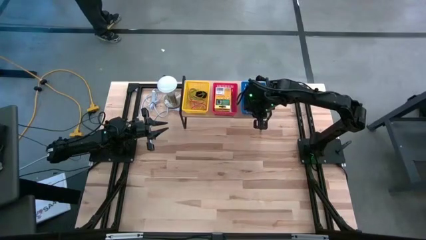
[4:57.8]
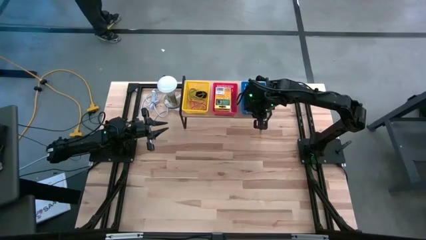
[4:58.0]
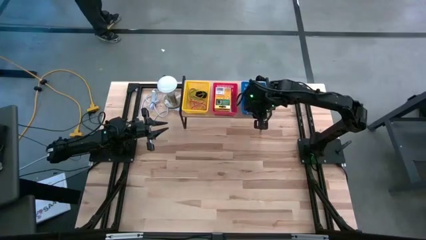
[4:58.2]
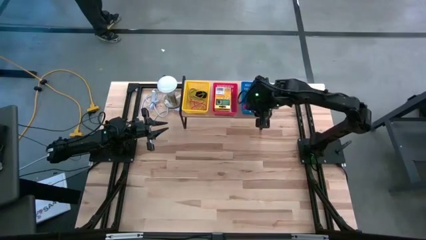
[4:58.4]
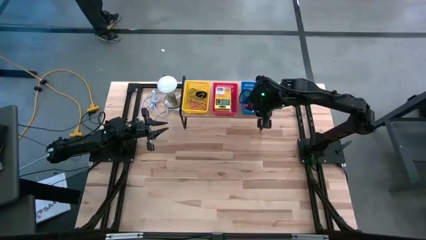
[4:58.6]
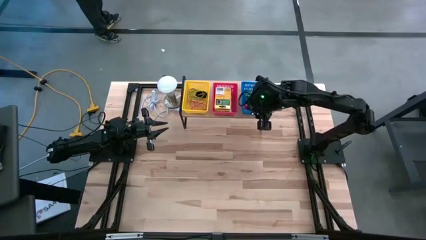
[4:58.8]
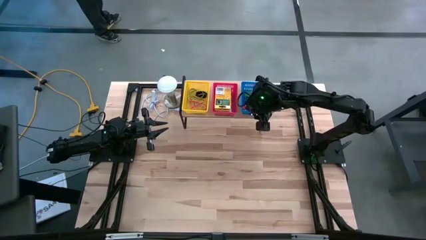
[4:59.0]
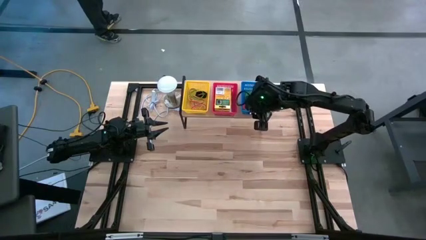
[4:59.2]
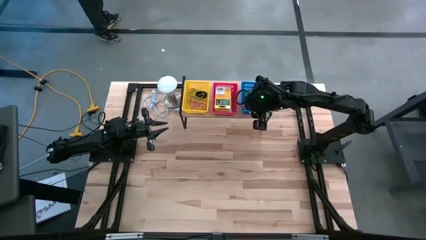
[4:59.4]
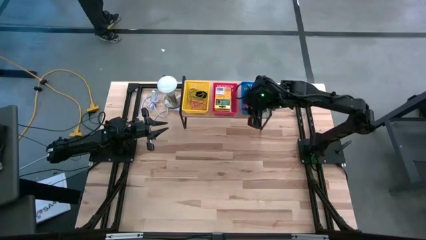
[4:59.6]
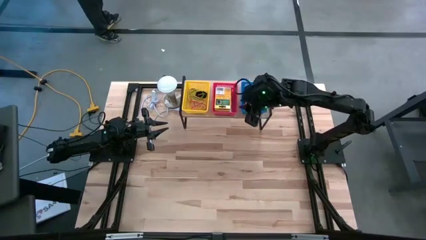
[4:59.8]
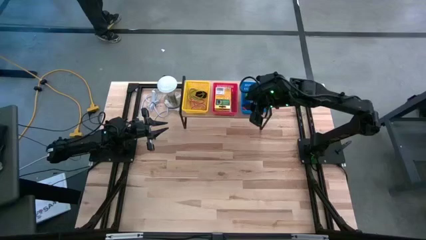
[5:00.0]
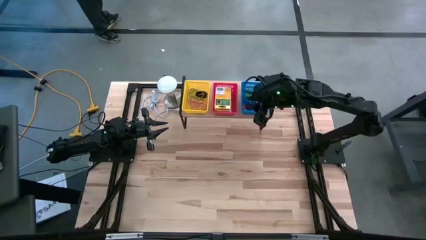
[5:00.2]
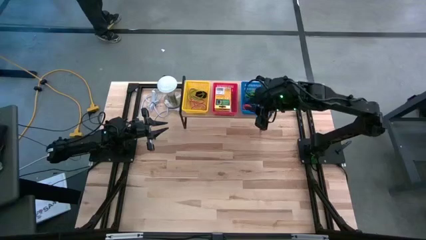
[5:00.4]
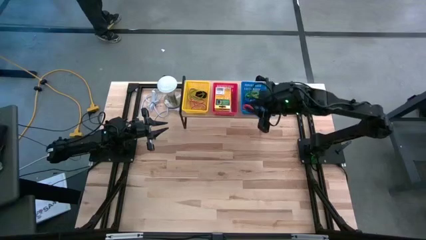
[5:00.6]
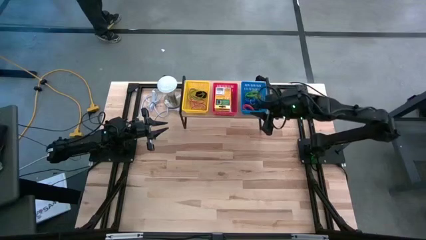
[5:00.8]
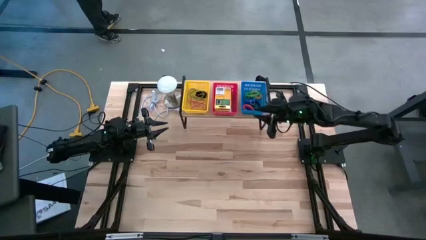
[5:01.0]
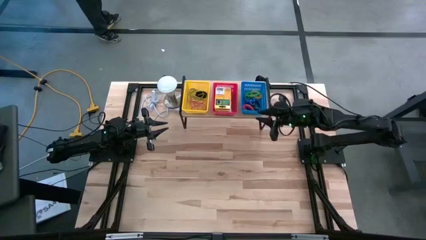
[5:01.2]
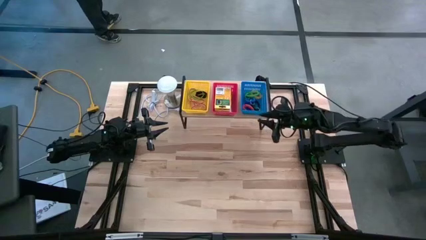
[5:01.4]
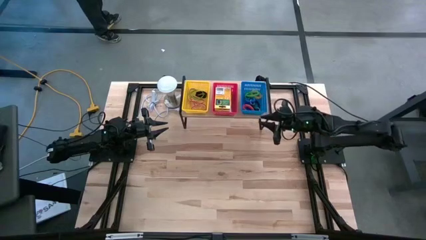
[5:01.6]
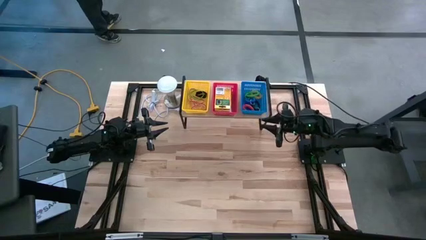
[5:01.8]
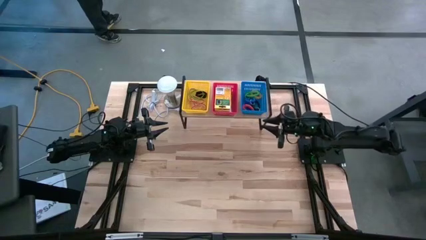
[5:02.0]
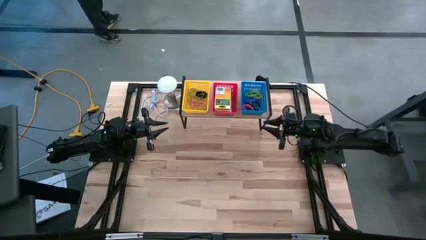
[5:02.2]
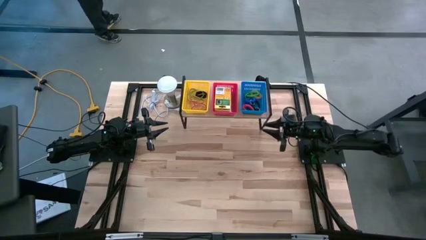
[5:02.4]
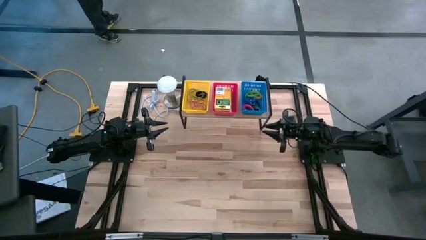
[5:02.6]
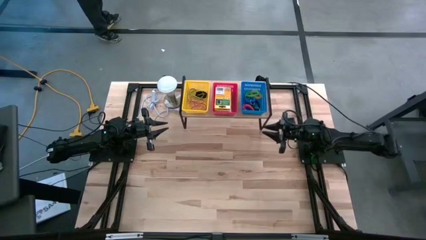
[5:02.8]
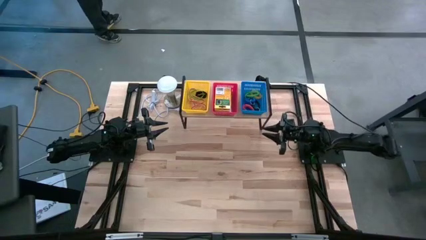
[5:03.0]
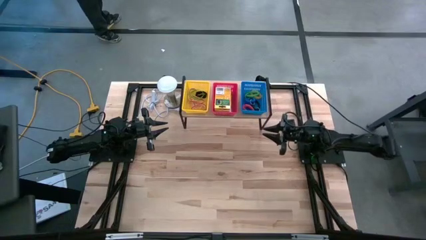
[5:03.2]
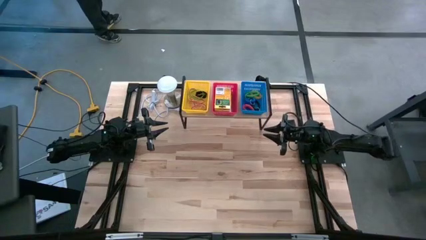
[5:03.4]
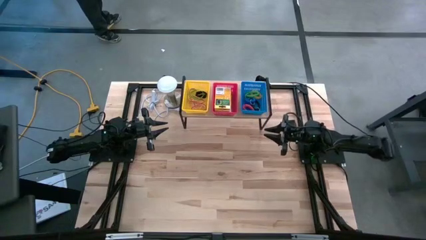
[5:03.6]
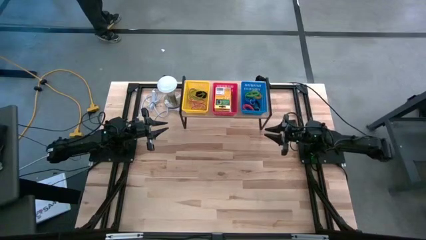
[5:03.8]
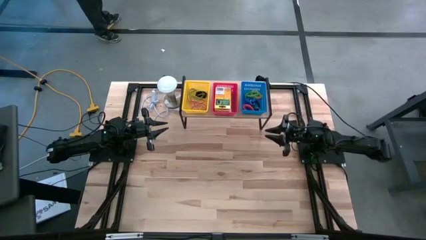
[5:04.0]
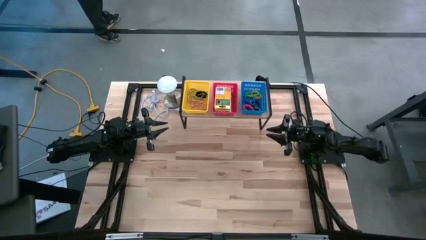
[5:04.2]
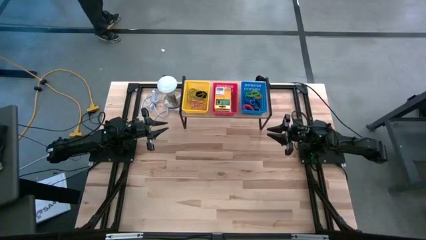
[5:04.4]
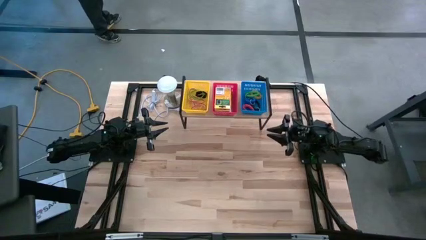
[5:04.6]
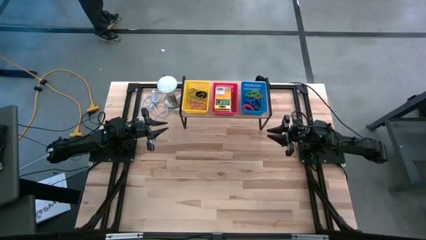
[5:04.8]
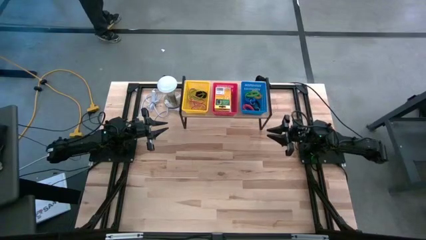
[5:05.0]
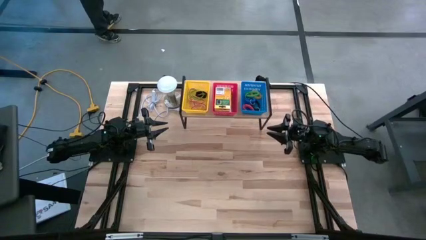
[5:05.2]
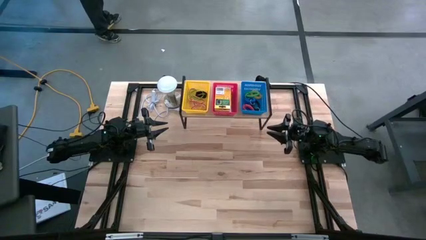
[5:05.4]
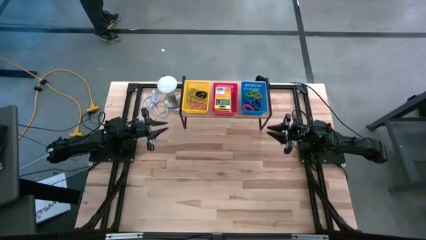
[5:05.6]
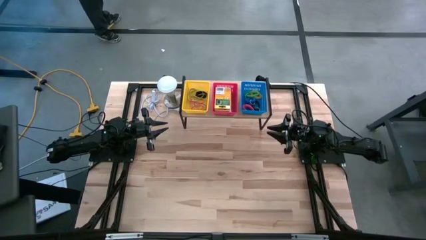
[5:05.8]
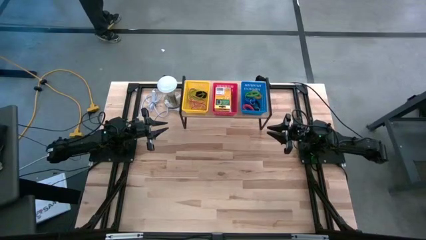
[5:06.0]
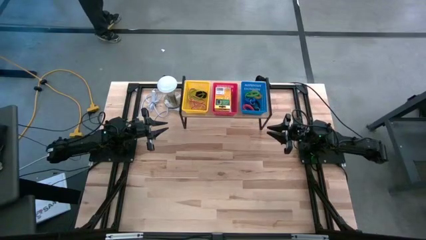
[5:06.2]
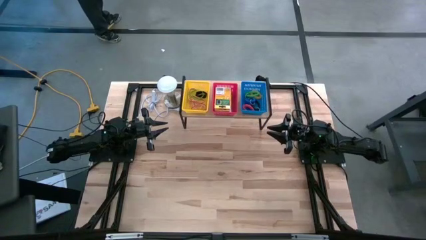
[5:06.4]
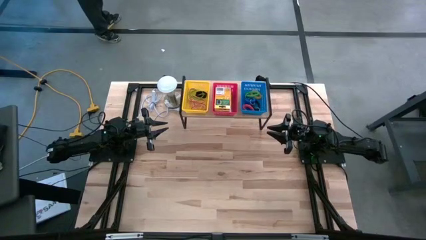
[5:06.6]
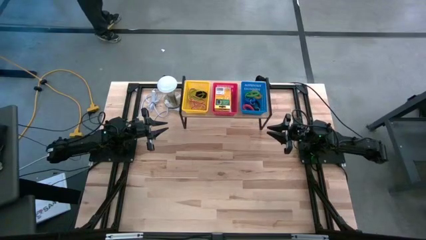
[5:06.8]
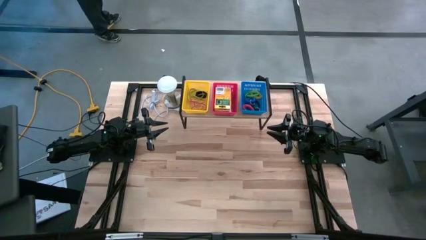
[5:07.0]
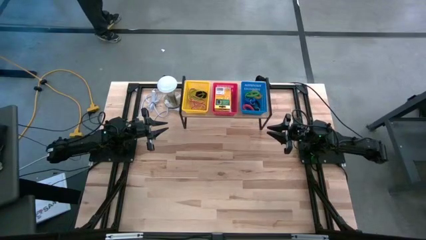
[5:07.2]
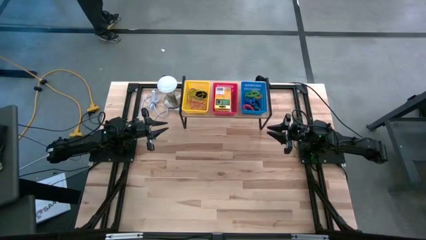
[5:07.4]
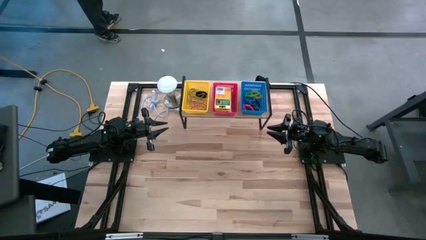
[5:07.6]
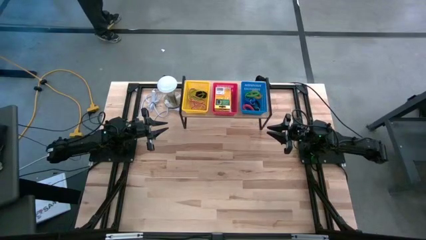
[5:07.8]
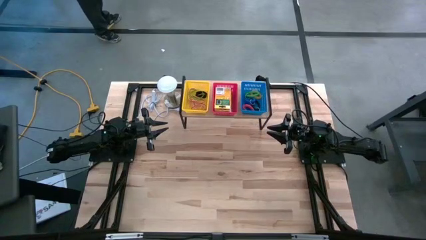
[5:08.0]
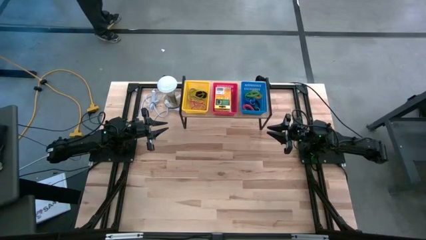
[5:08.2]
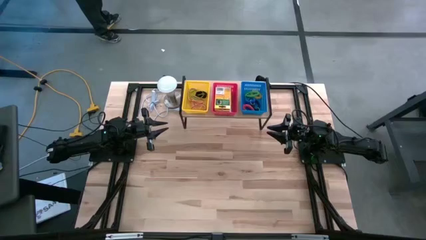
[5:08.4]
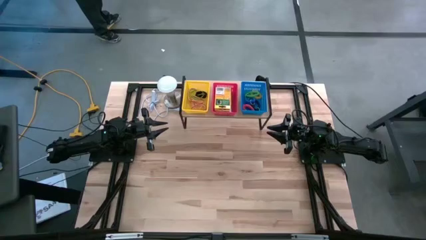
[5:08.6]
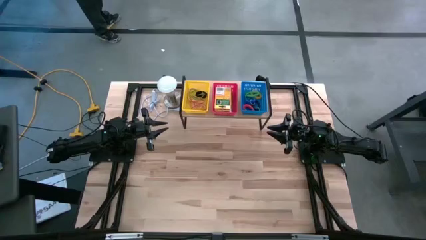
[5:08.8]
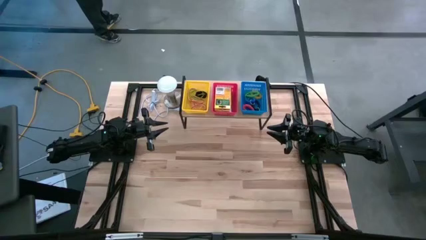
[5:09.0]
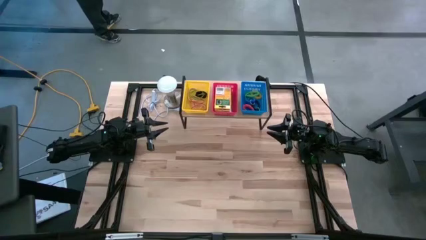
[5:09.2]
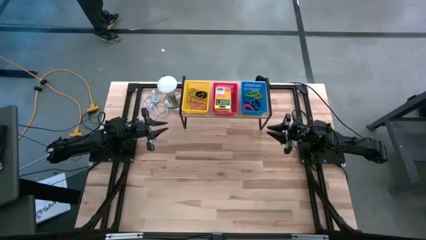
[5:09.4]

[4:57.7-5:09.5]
Task: Pick & Place Office Desk Supplies
Return to Home Position
